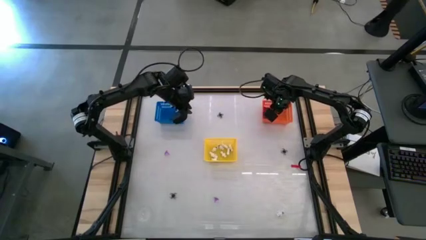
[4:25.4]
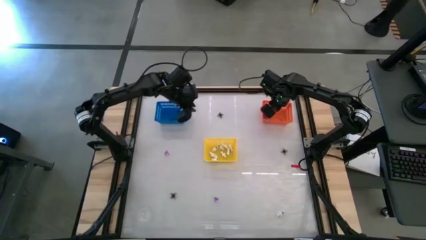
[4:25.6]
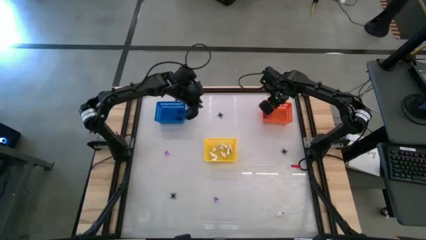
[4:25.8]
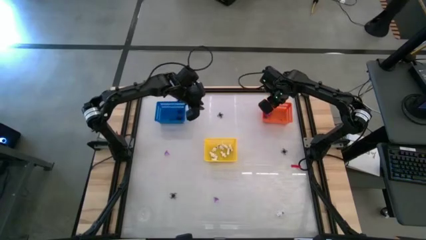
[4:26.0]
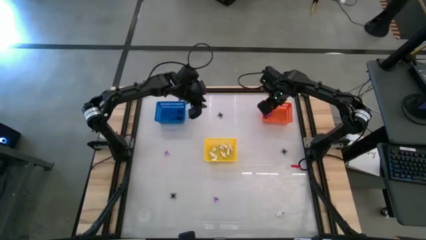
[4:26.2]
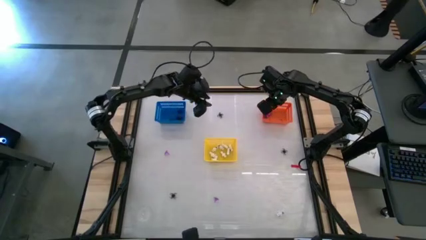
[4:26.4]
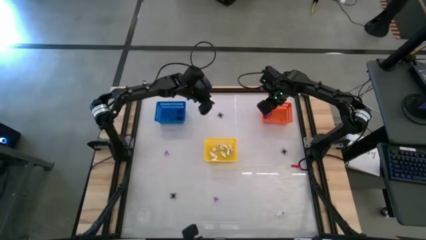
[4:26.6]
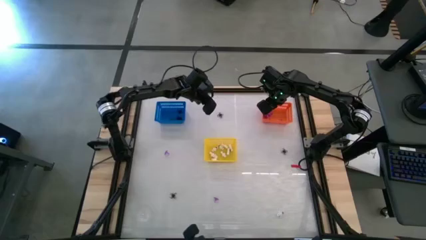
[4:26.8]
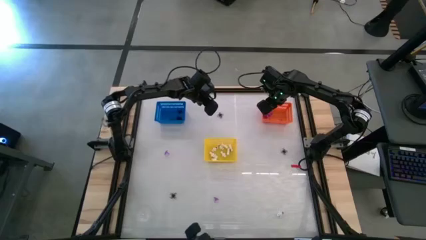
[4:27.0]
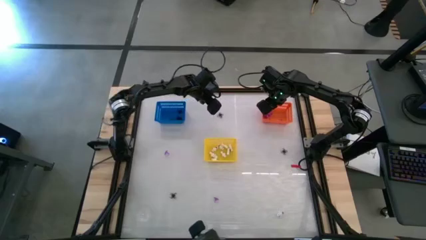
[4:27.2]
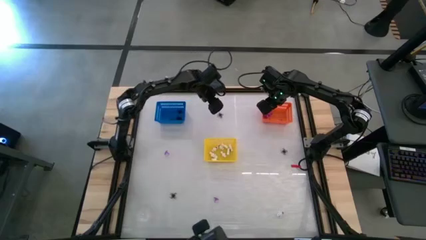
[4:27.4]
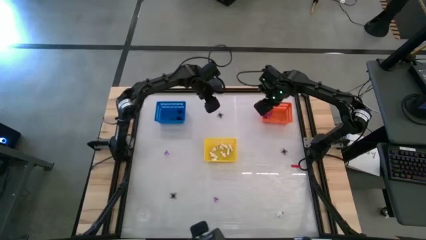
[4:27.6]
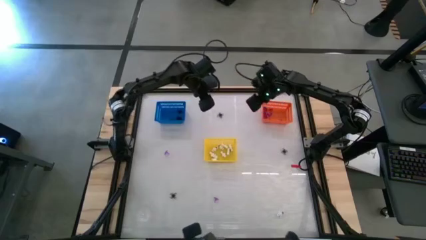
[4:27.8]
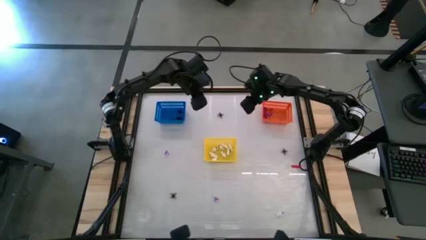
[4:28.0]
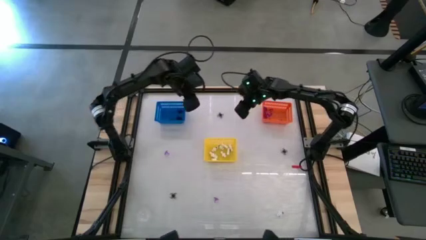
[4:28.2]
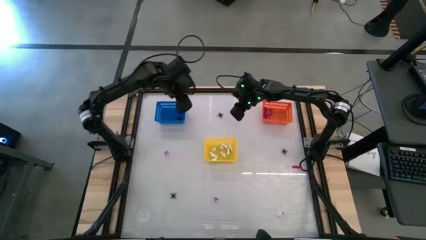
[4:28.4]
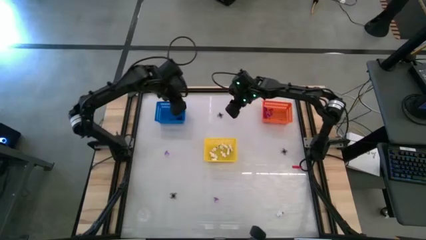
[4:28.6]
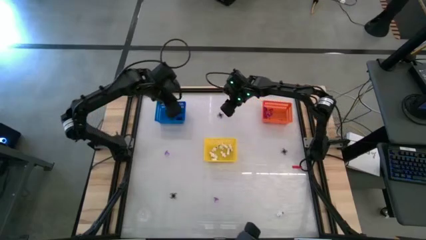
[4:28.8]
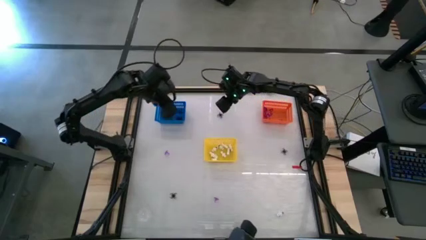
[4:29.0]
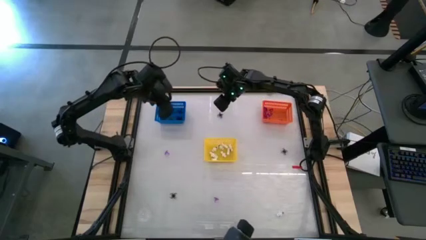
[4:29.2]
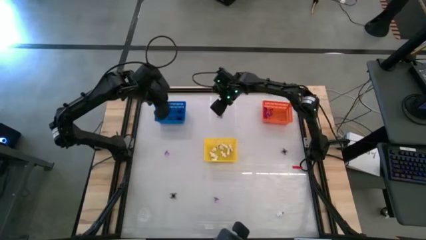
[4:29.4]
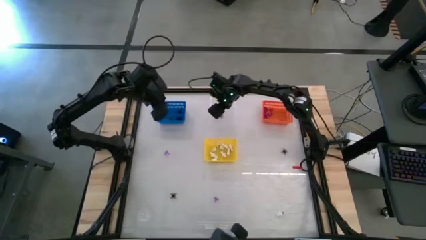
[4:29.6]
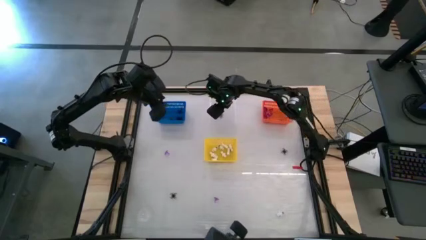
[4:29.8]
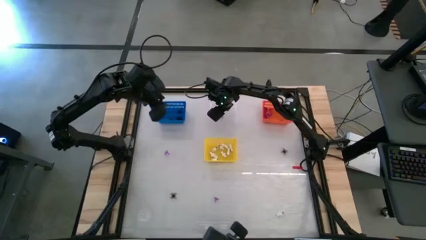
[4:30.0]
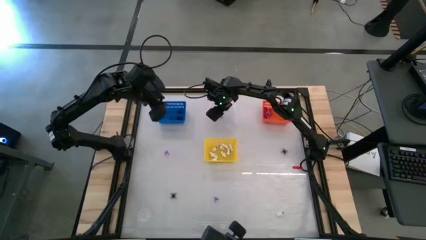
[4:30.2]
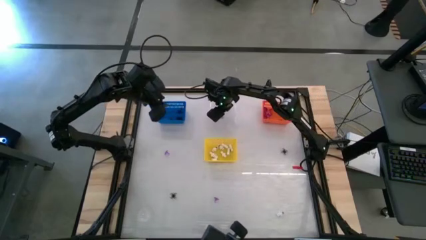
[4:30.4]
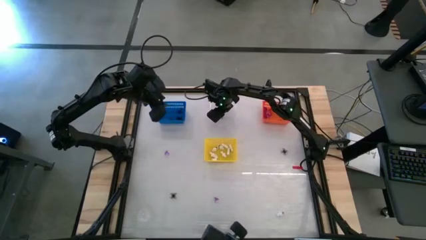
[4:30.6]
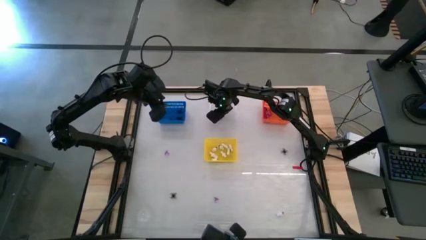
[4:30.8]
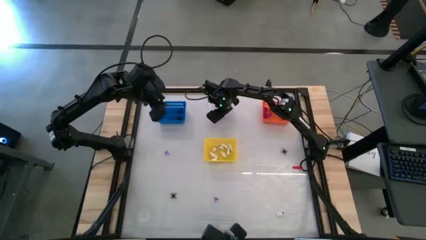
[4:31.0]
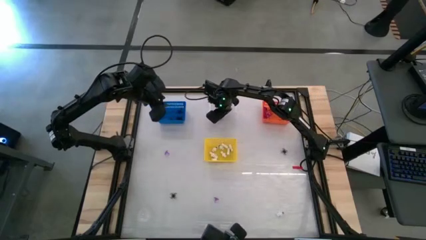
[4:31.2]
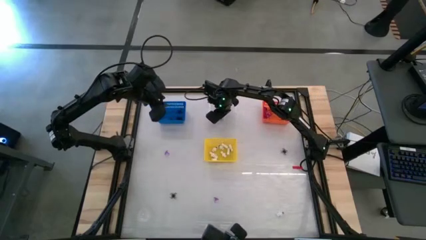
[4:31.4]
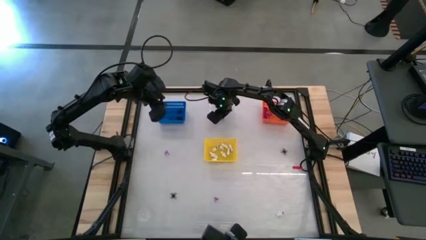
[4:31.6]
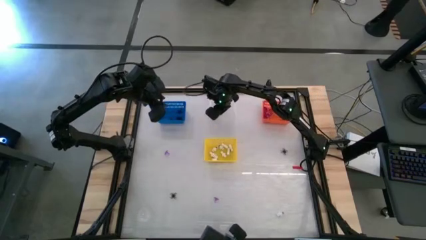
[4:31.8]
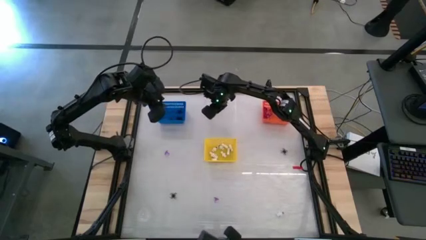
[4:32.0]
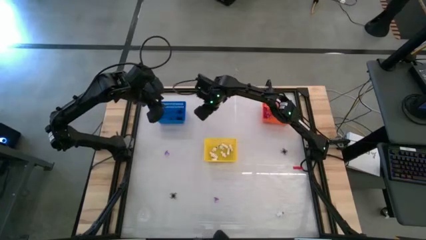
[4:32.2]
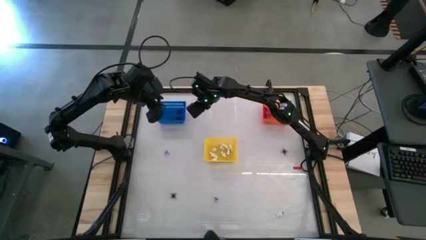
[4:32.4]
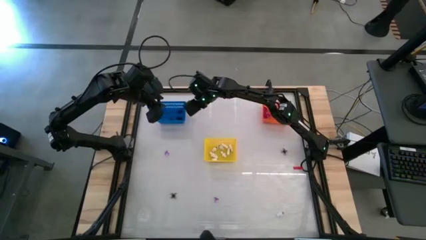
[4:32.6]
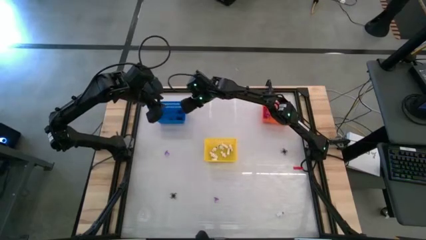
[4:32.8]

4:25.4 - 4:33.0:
Task: Sort Halloween decoration
Put the black spider toy into the blue bin

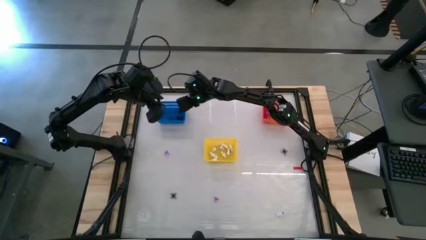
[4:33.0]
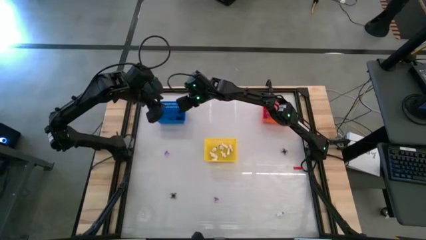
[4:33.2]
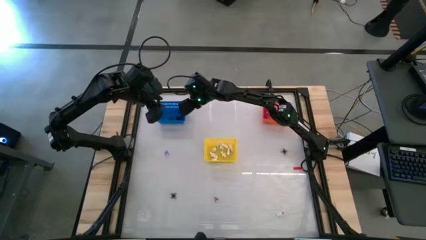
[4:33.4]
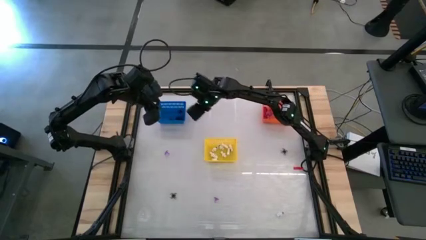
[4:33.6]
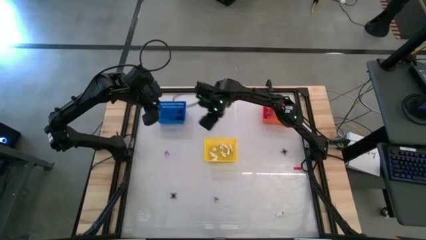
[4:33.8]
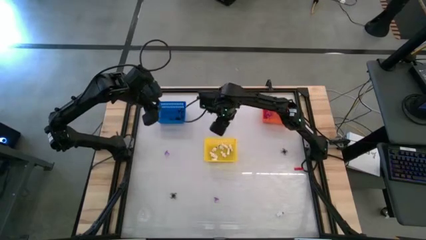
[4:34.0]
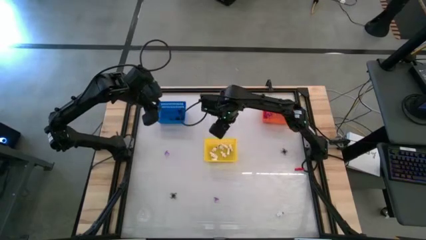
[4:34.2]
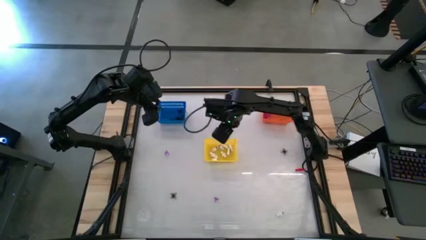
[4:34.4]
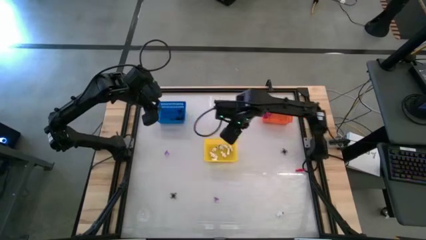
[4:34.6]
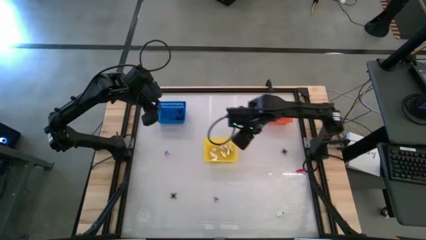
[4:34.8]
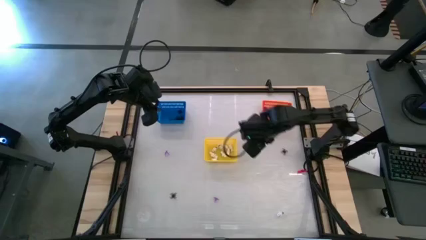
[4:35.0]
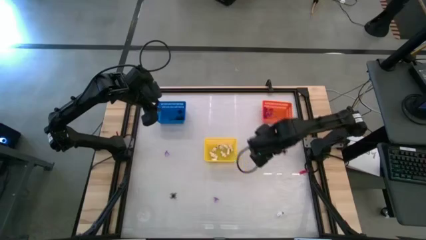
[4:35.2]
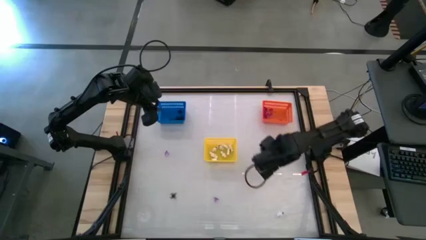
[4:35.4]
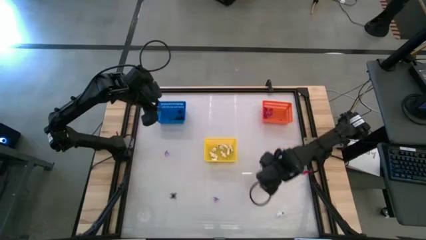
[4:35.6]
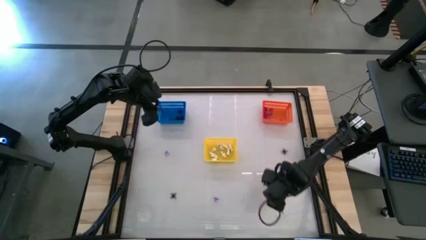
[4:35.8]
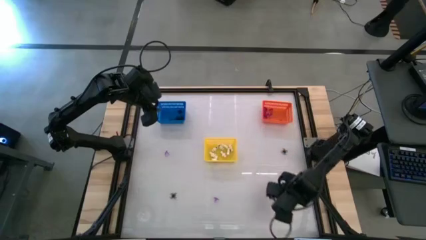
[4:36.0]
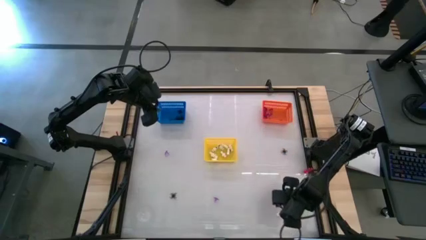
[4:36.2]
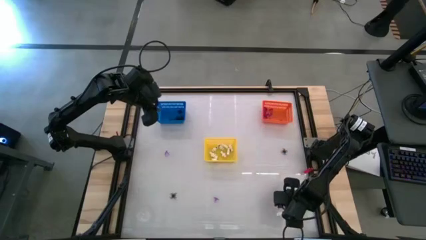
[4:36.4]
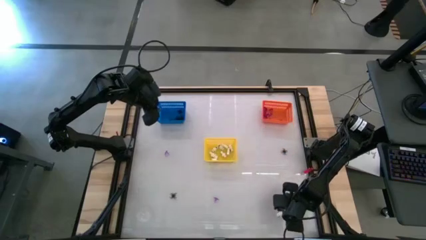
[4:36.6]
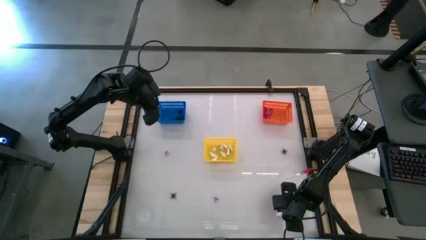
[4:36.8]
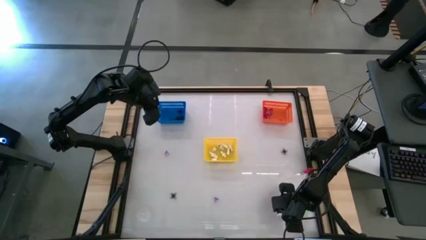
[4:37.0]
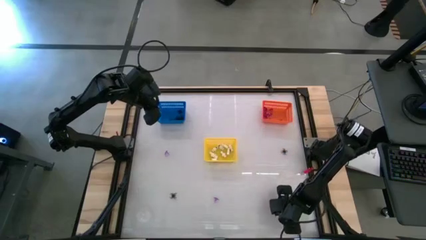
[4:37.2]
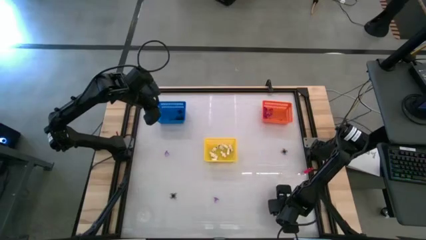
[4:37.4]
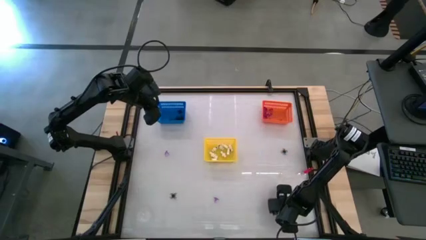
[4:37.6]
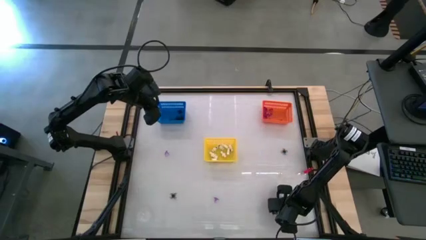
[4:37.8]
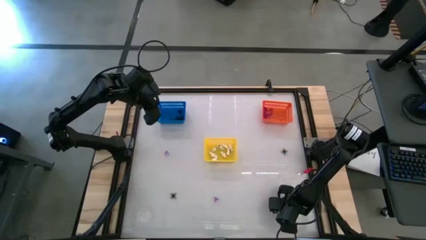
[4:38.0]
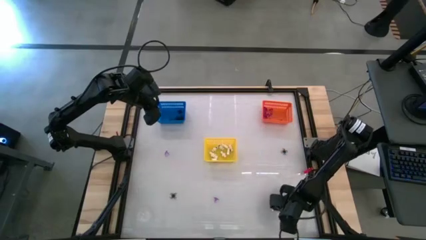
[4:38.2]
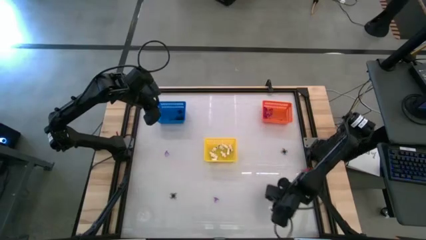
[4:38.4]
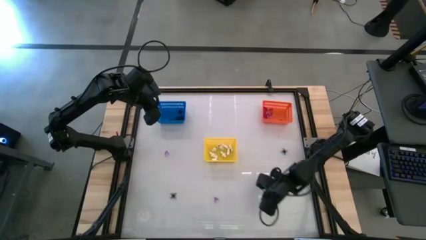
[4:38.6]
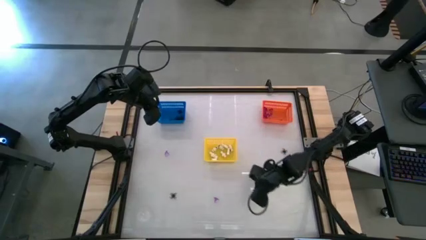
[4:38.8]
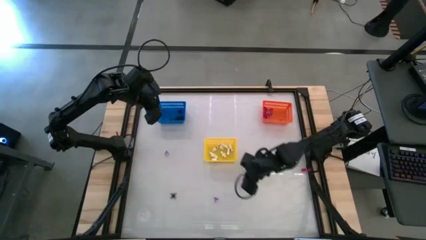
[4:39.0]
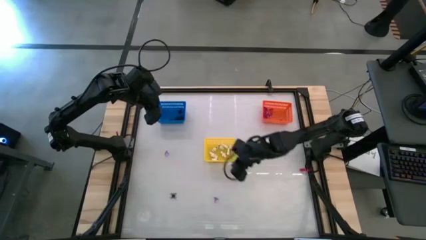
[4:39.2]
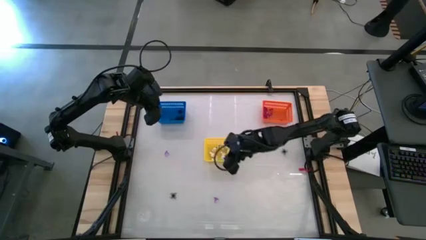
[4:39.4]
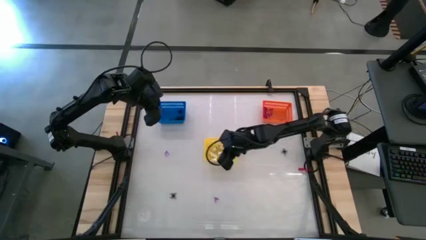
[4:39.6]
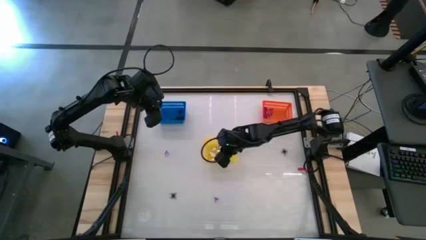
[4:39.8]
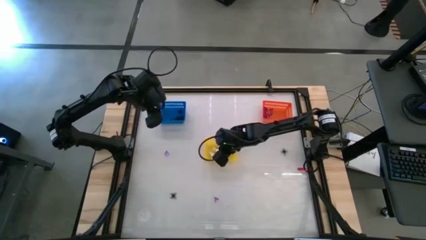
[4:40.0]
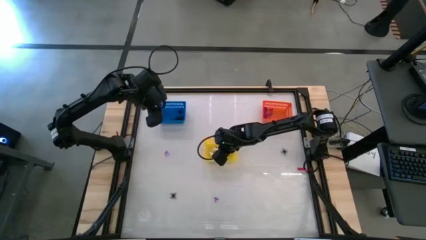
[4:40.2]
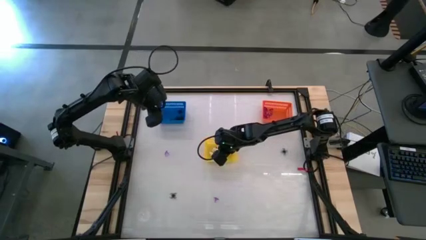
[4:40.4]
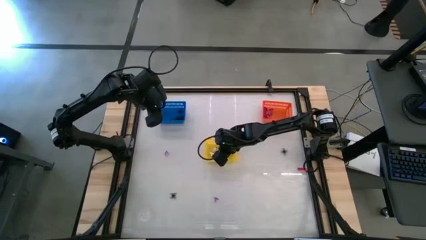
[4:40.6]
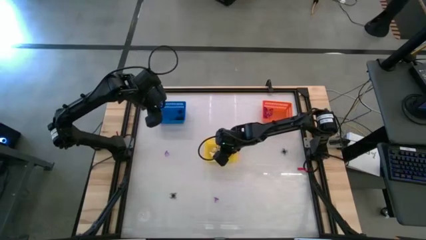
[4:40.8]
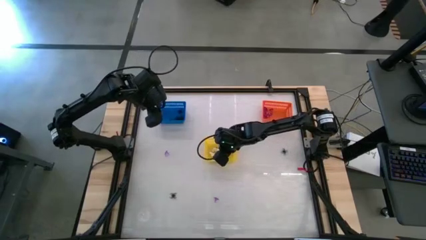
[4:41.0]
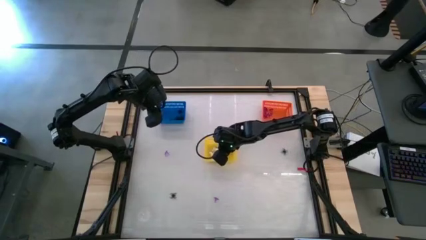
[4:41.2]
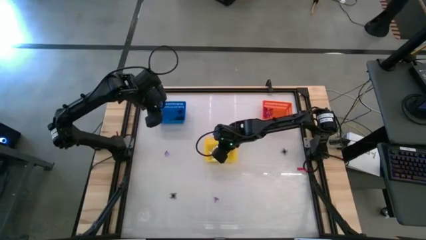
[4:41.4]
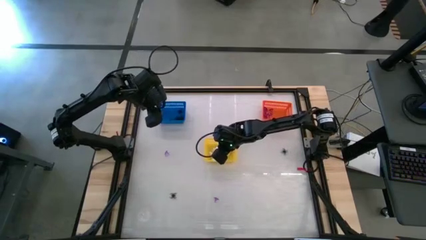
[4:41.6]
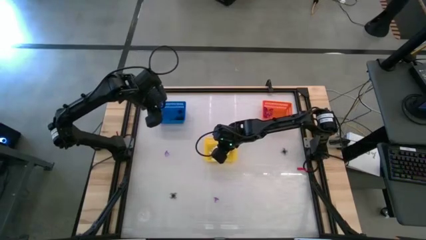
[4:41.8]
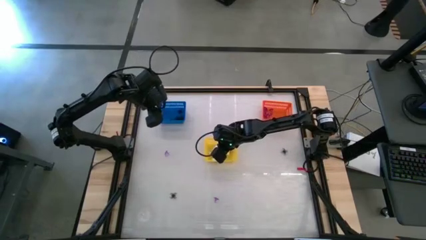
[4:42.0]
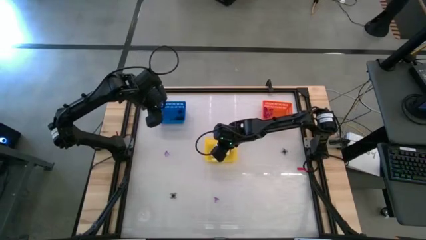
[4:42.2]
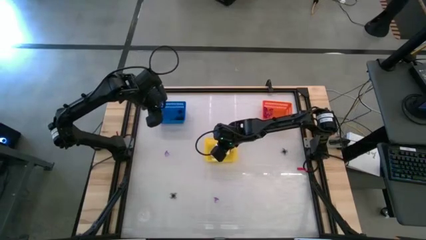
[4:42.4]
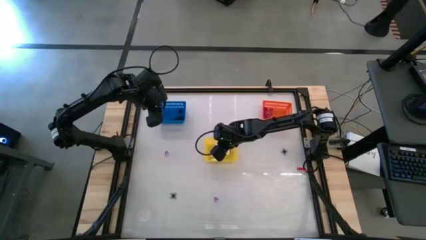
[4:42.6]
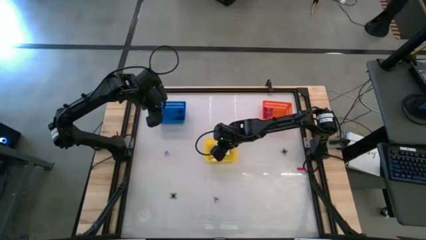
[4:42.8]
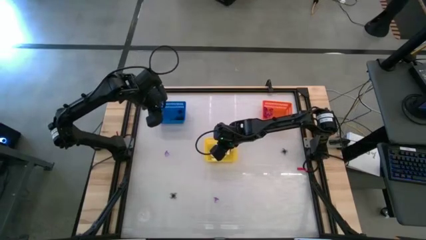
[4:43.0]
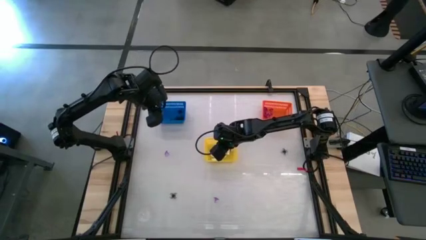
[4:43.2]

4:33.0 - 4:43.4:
Put the white skeleton toy into the yellow bin
